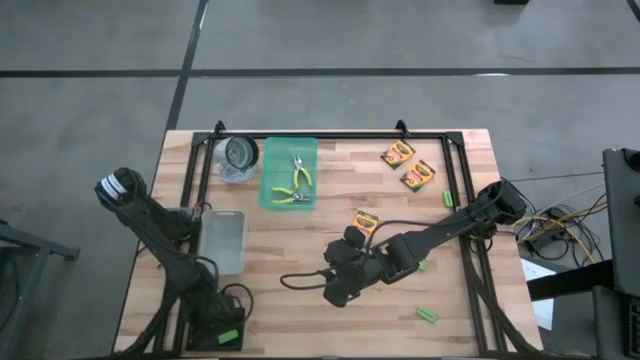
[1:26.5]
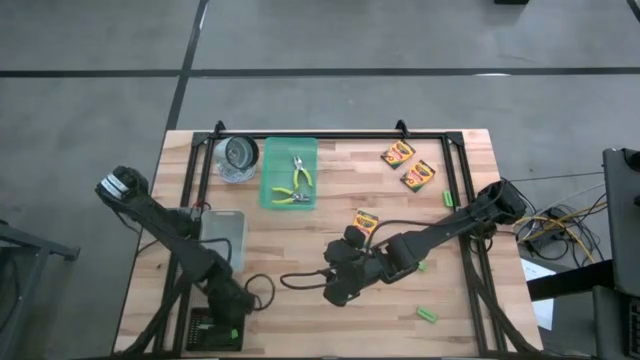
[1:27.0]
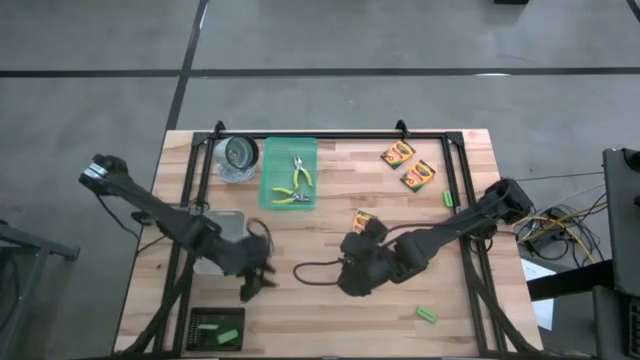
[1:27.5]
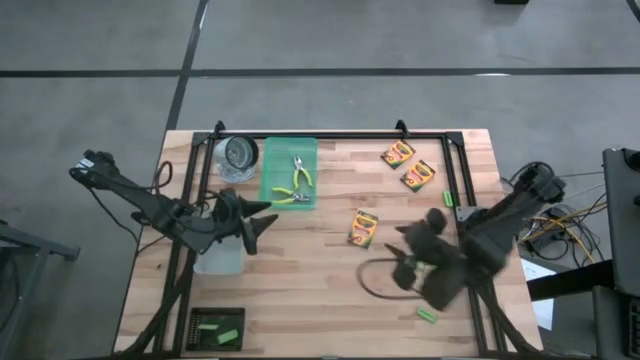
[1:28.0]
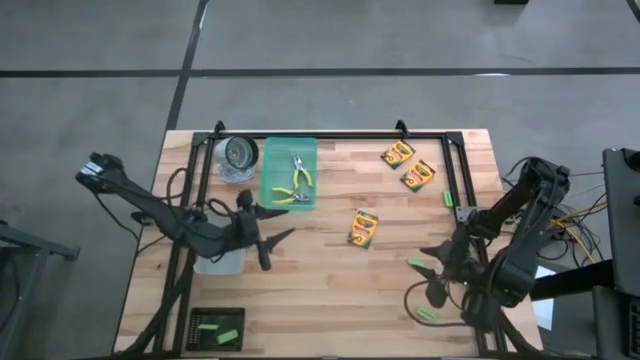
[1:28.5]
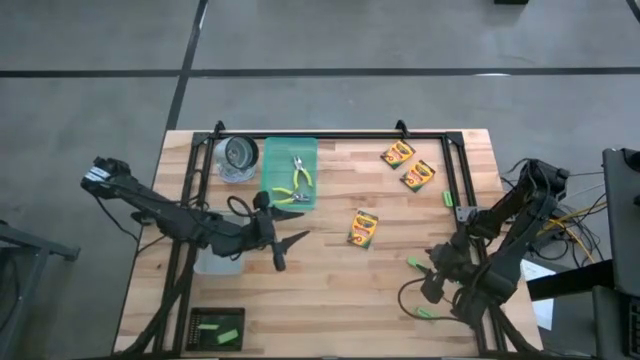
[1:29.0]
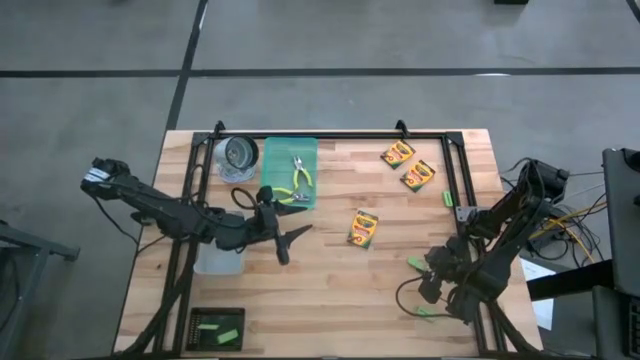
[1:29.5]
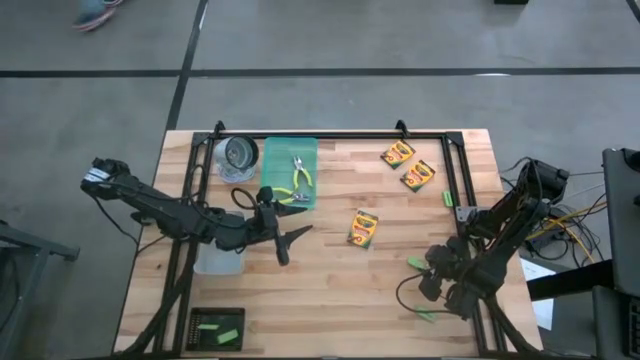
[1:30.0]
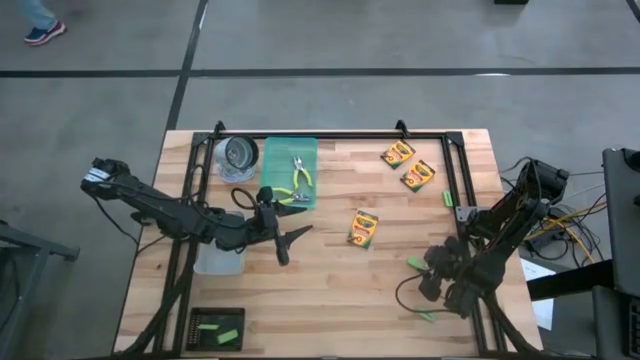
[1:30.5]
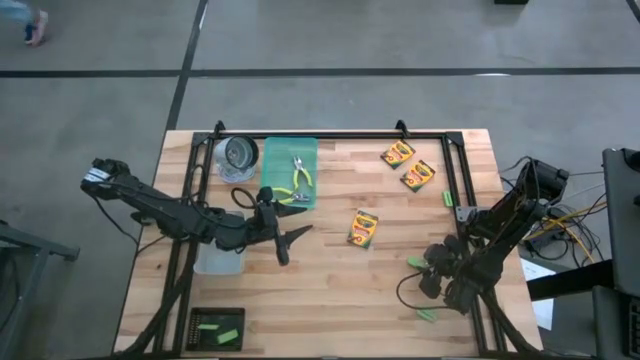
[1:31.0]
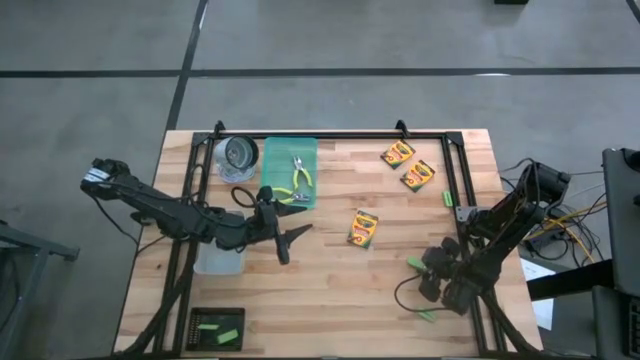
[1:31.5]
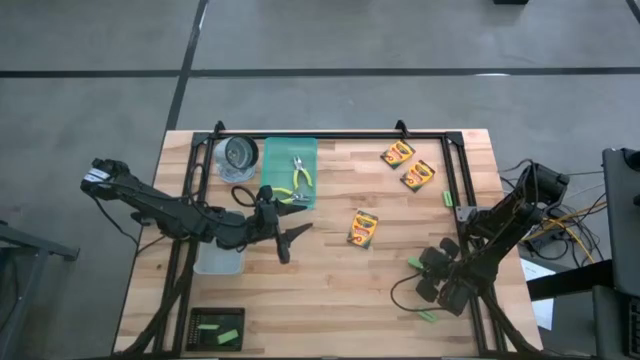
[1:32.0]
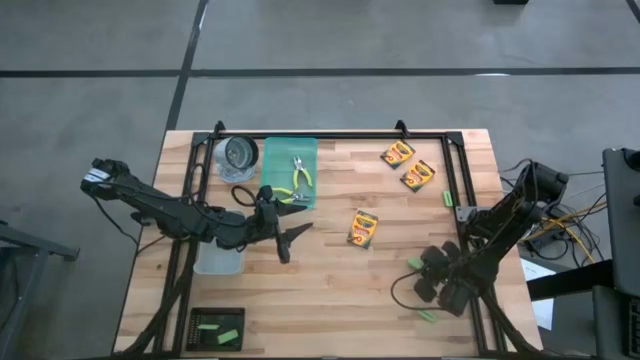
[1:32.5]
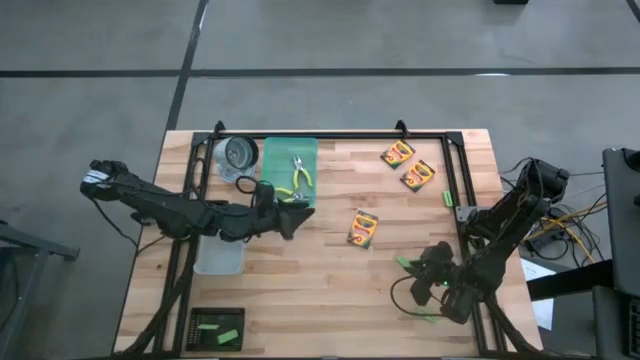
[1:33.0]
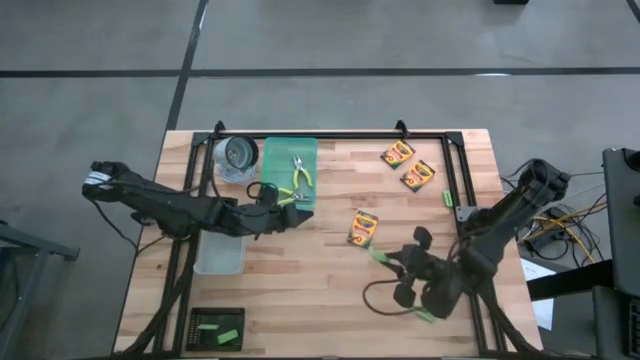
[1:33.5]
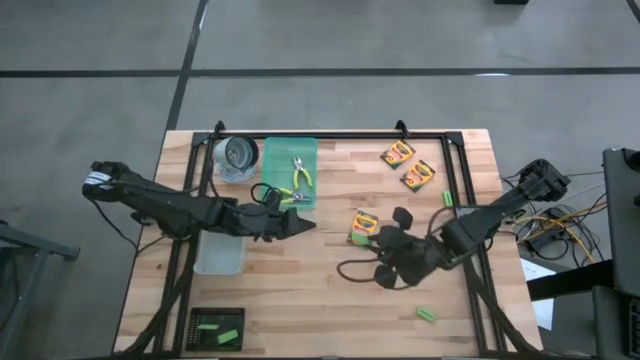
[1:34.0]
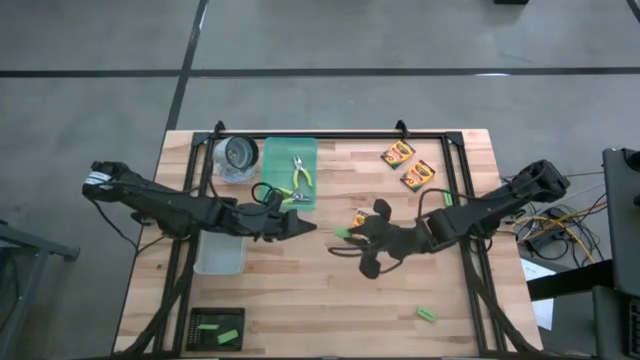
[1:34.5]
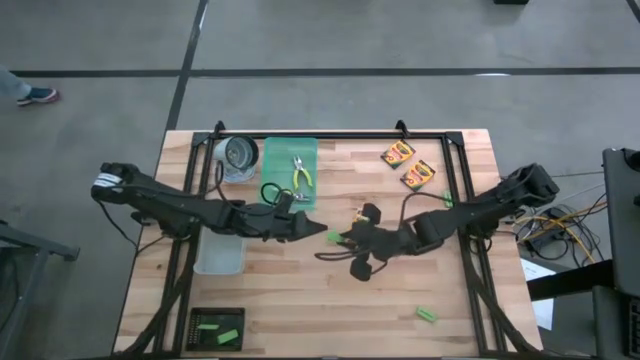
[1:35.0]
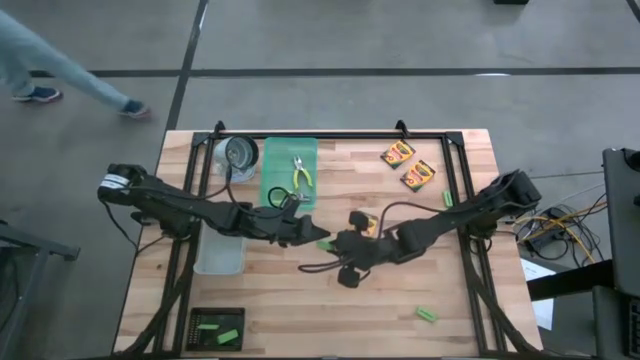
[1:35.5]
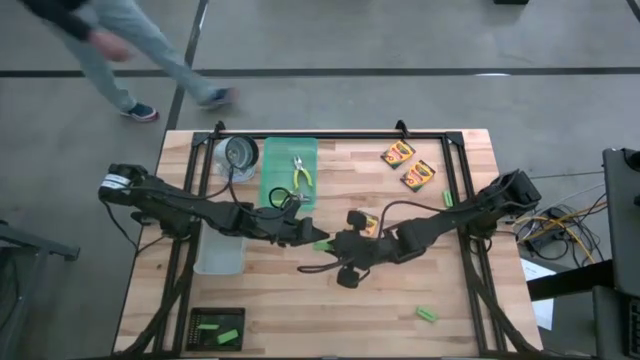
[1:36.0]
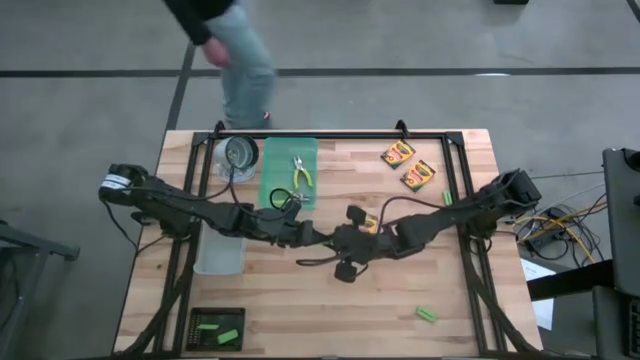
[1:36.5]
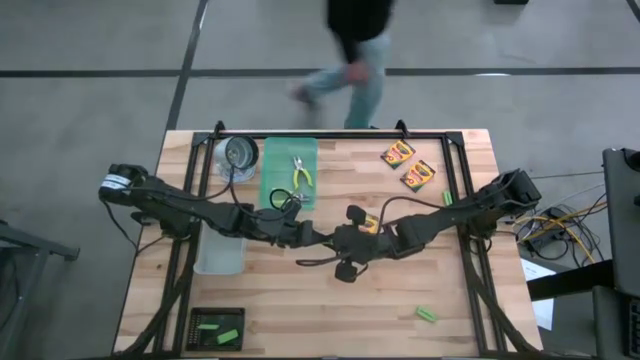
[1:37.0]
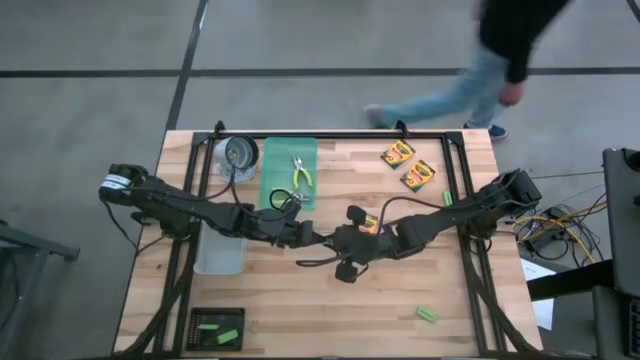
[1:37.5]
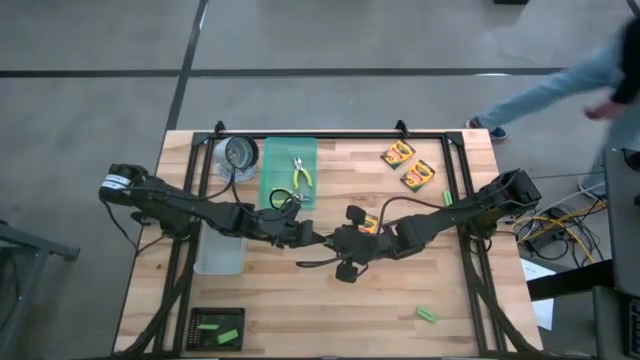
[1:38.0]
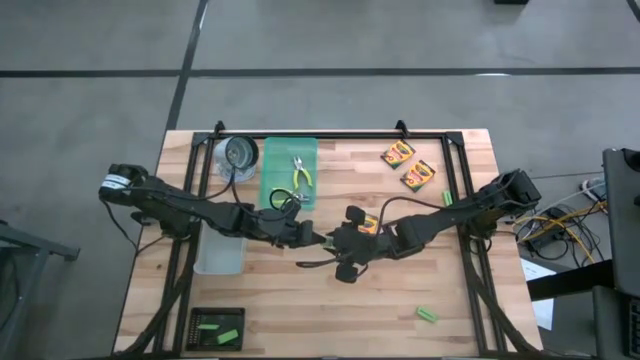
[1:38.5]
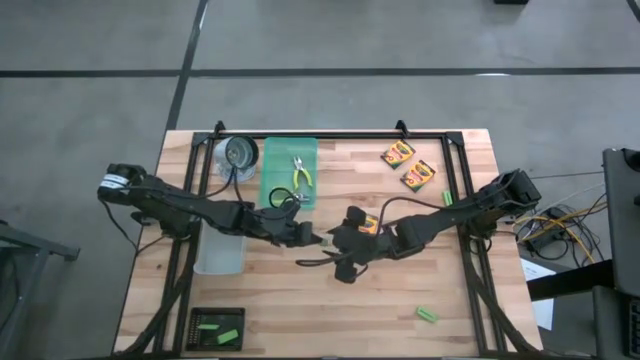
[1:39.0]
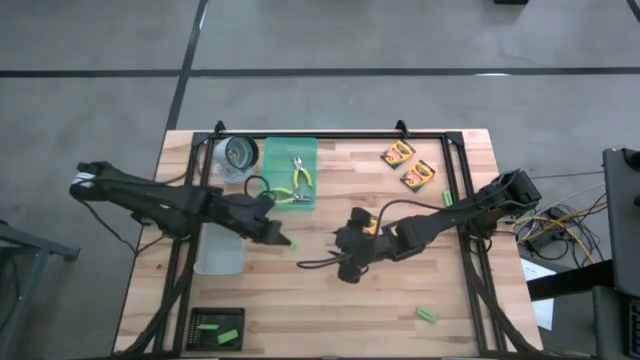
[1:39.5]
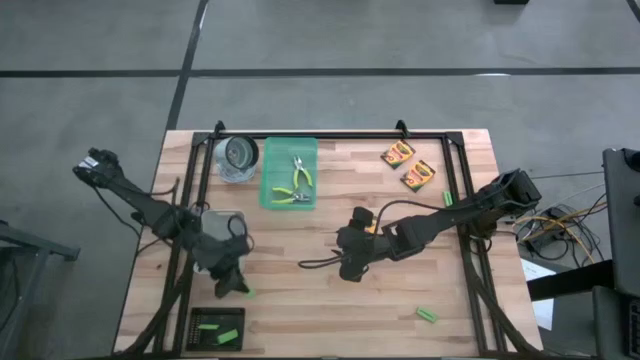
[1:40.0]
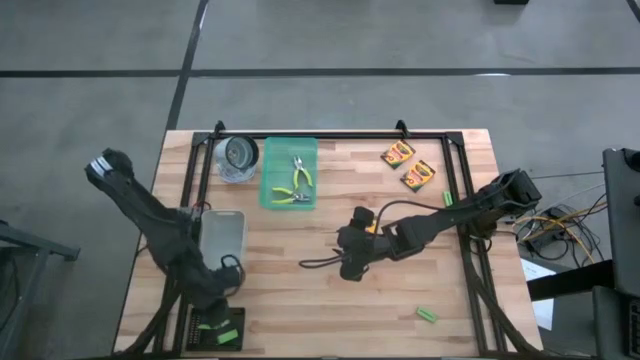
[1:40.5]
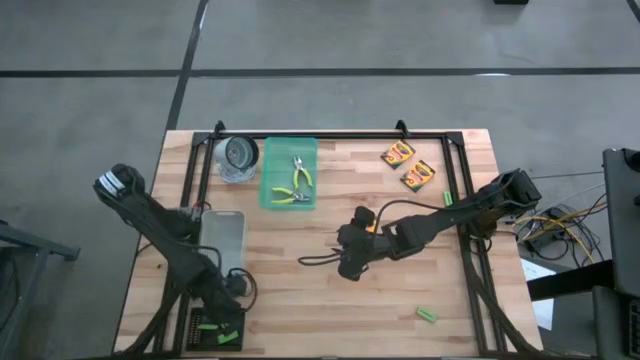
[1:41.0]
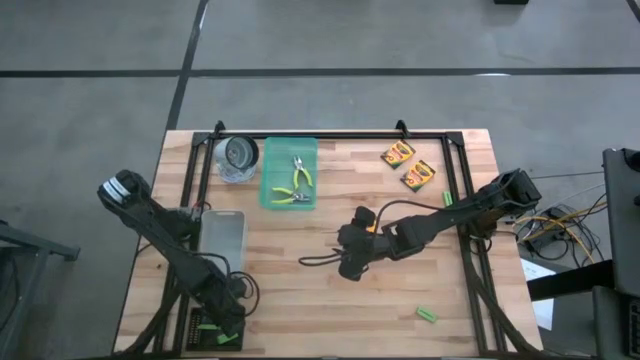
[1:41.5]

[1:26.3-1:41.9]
Task: Pick & Place School Supplies
Put the green eraser into the black bin

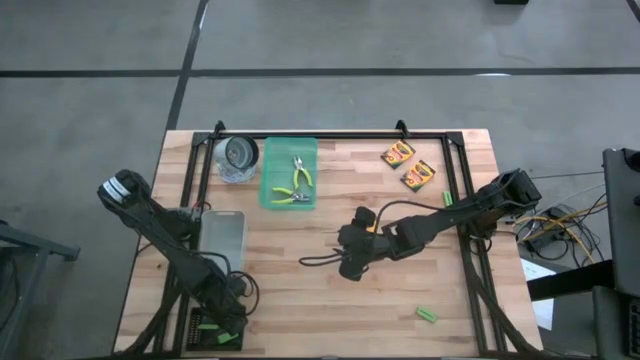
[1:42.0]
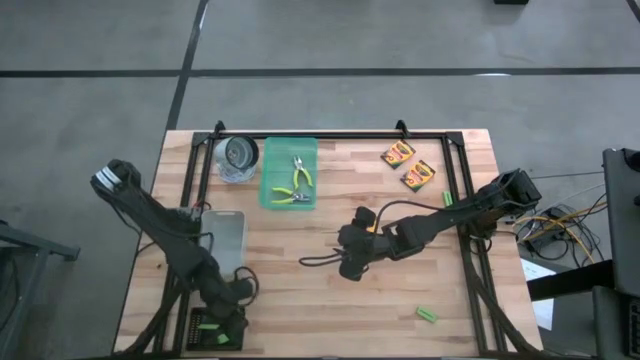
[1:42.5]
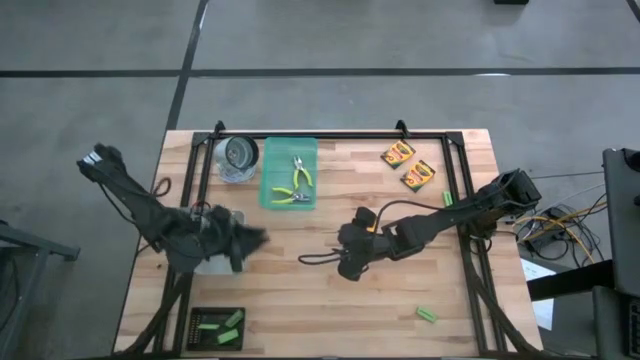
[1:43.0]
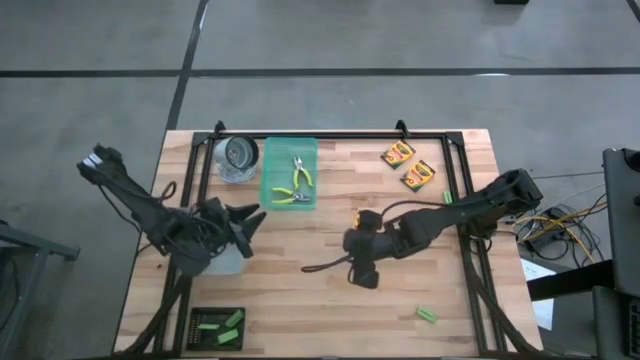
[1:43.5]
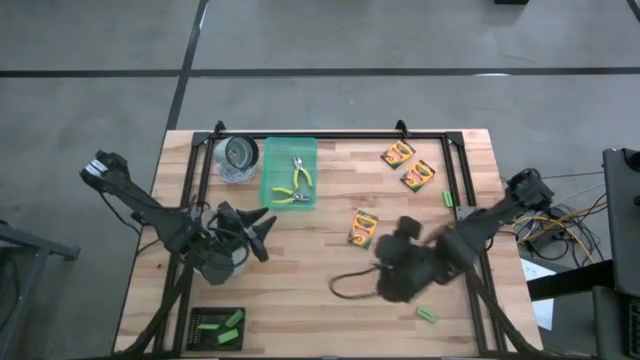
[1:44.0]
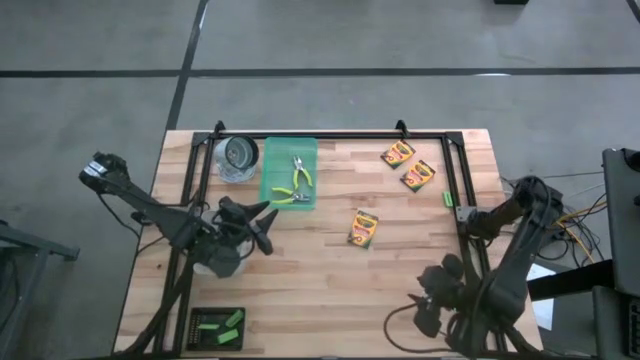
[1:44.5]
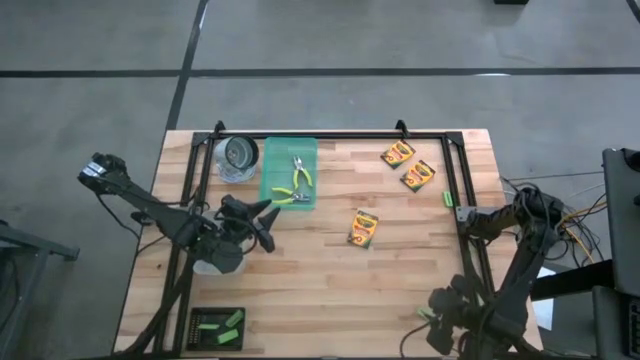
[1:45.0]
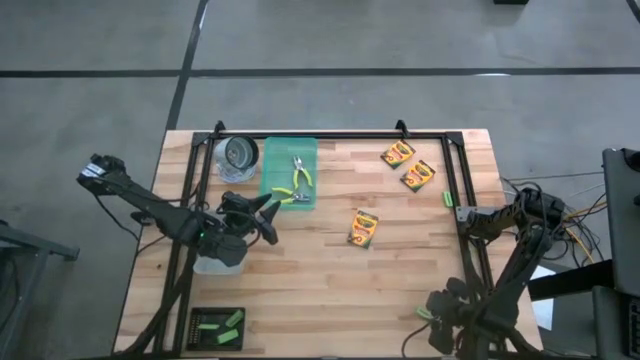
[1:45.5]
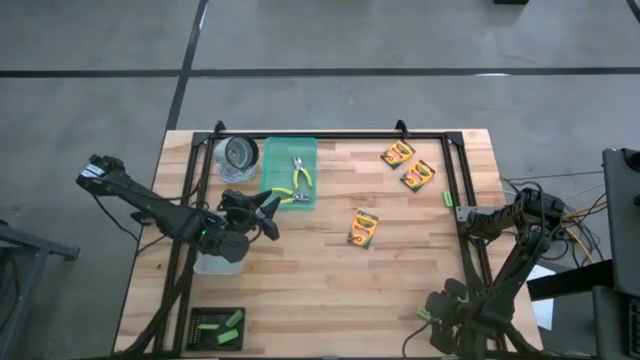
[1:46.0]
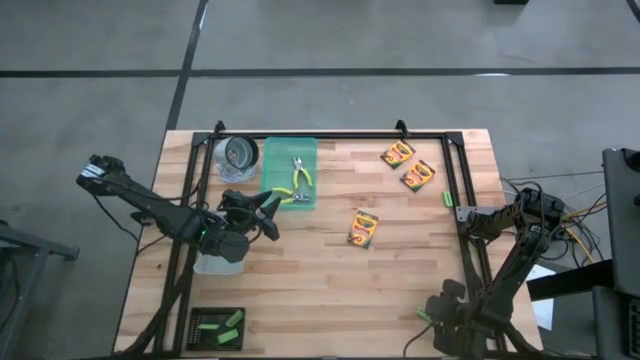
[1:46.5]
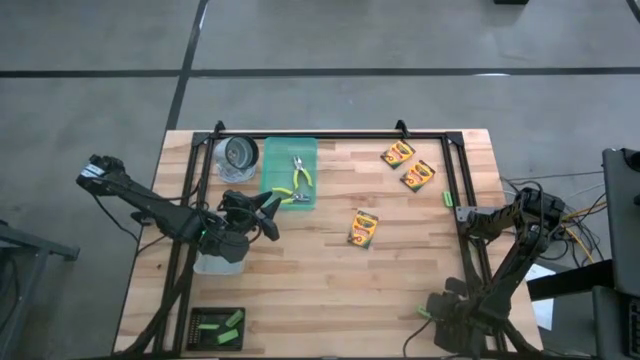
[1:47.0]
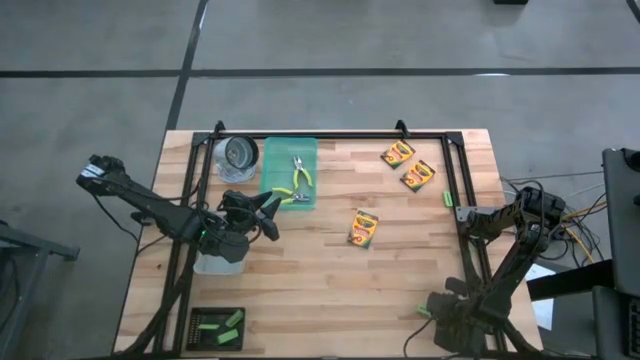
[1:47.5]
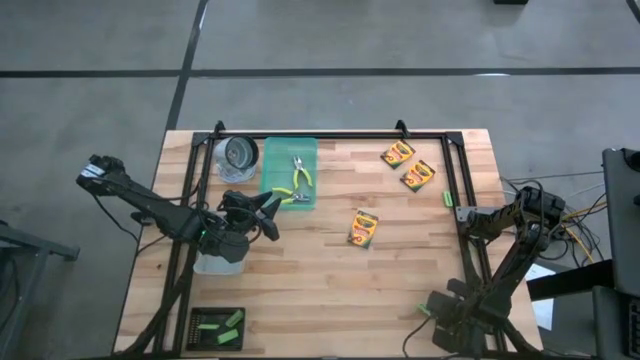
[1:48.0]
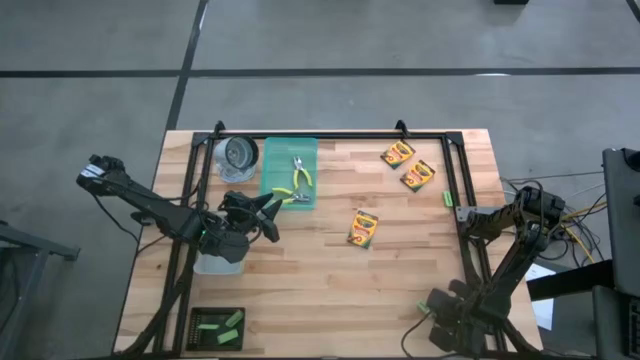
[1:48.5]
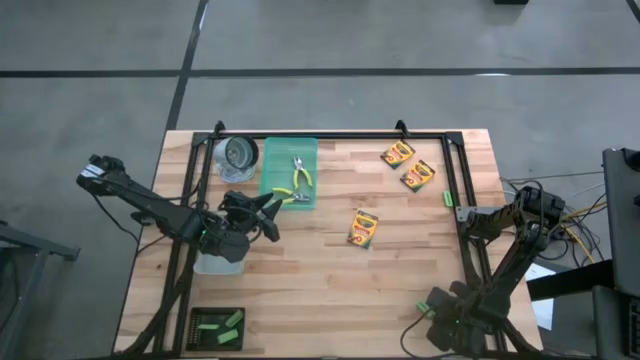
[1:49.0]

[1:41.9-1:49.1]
Put the green eraser into the black bin
